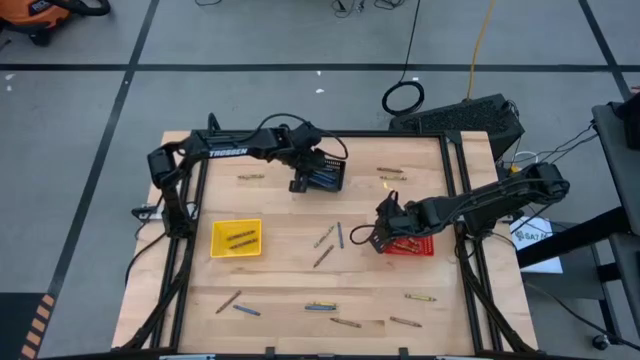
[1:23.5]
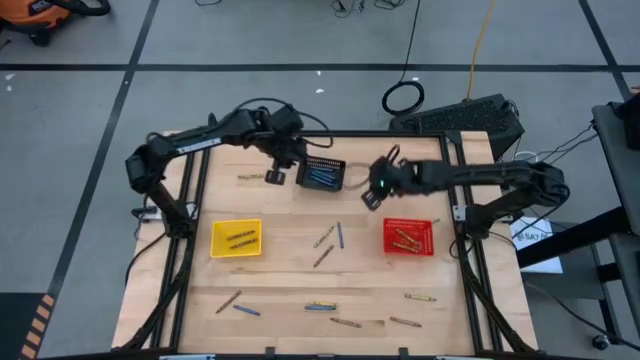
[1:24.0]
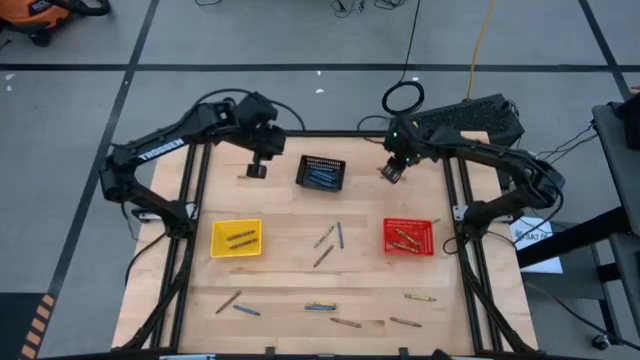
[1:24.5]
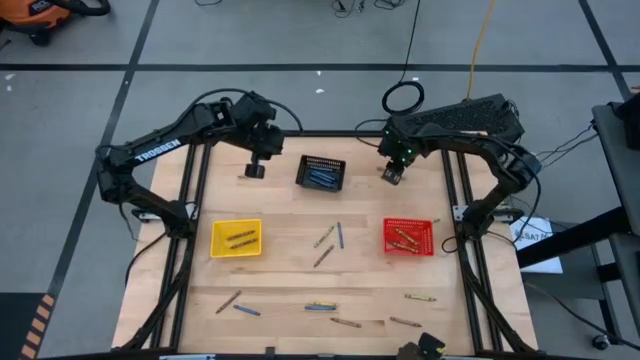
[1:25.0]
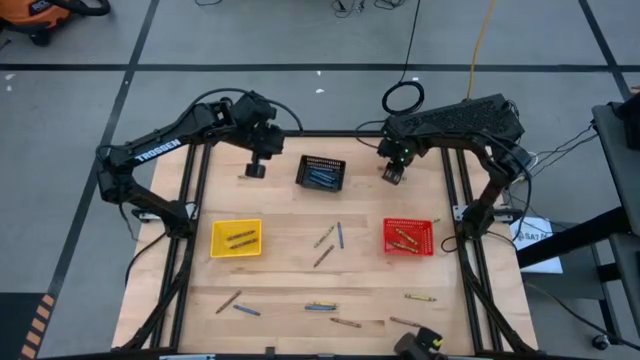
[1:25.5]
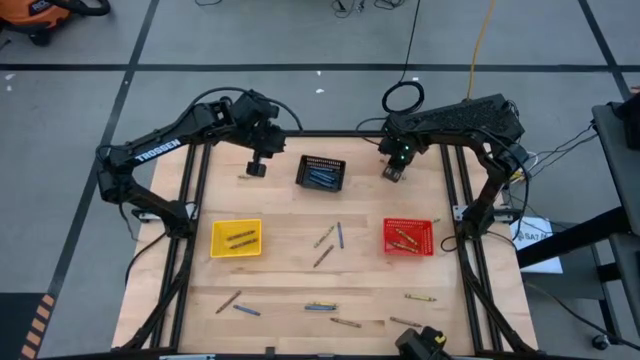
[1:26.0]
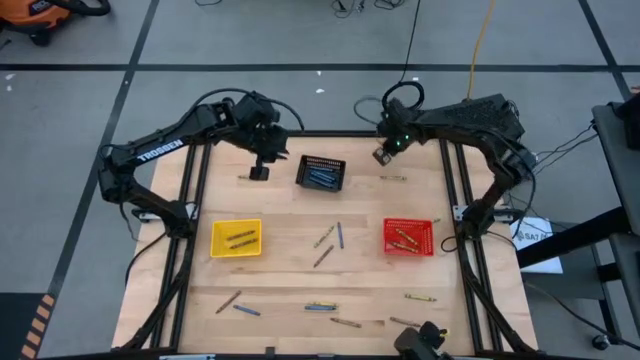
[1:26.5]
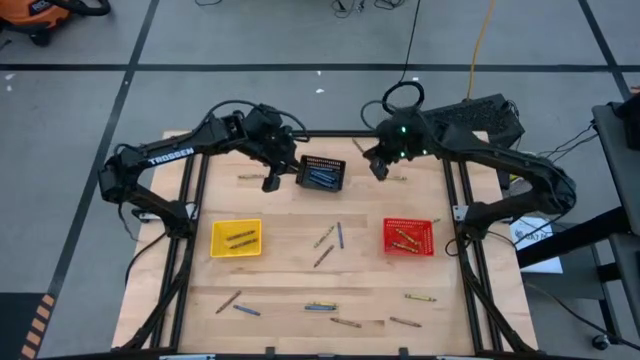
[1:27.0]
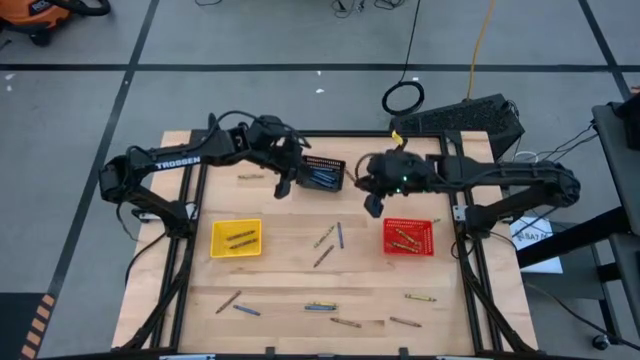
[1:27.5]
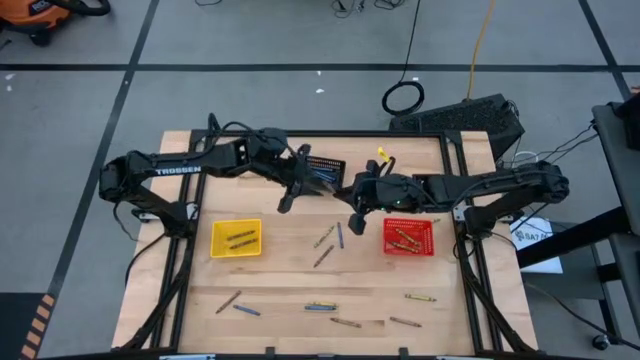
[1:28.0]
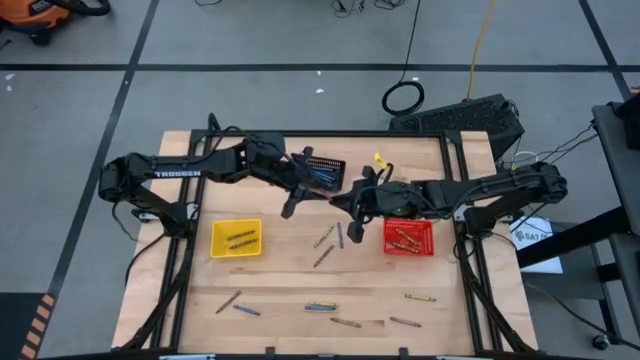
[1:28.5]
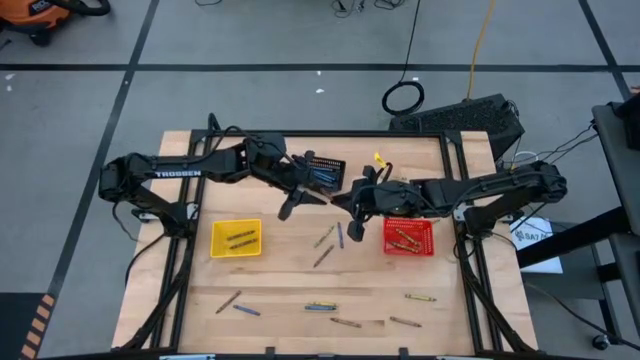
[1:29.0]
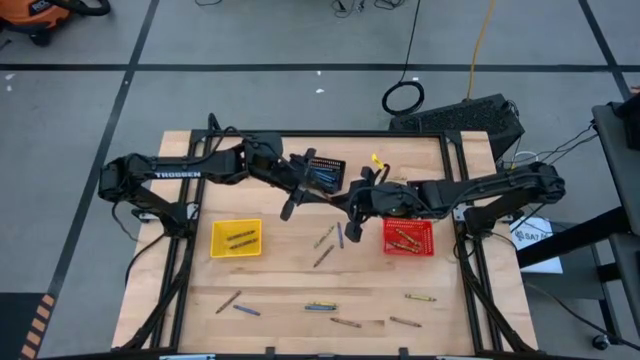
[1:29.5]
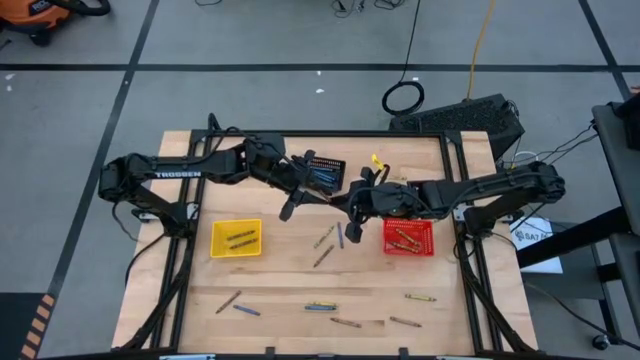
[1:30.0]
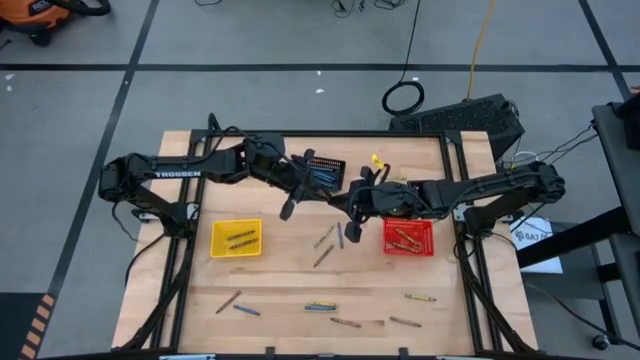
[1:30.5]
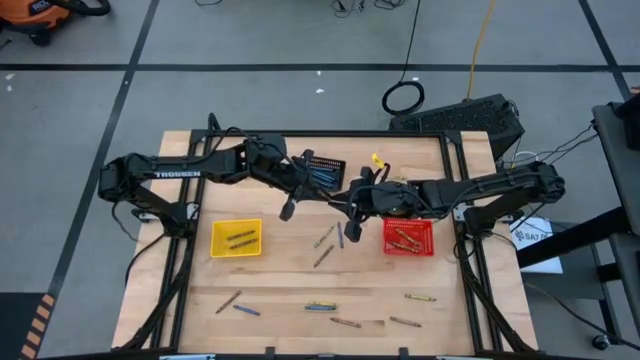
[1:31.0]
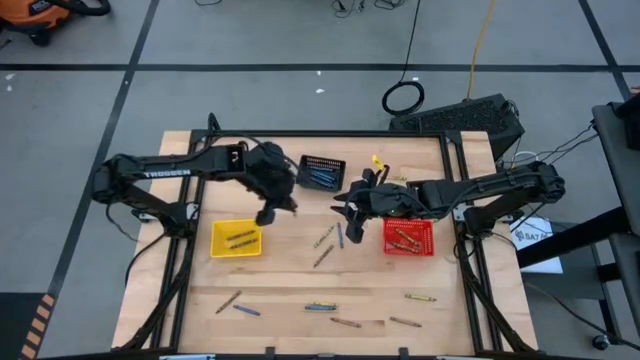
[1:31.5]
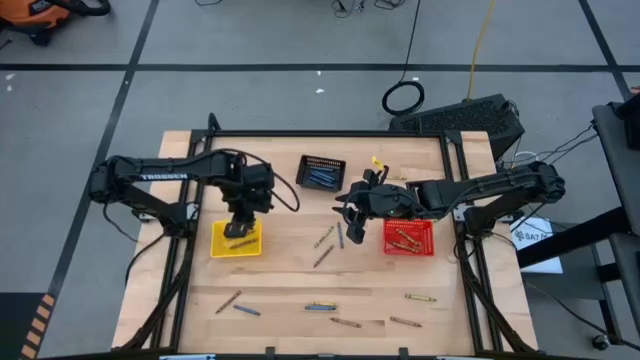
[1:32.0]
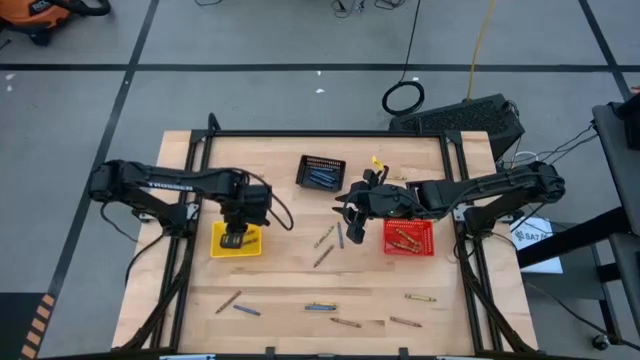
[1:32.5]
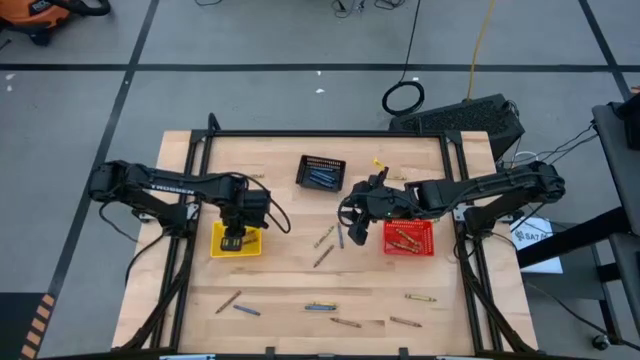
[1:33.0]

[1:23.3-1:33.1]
Task: Sort crayons
Put the brown crayon into the yellow bin

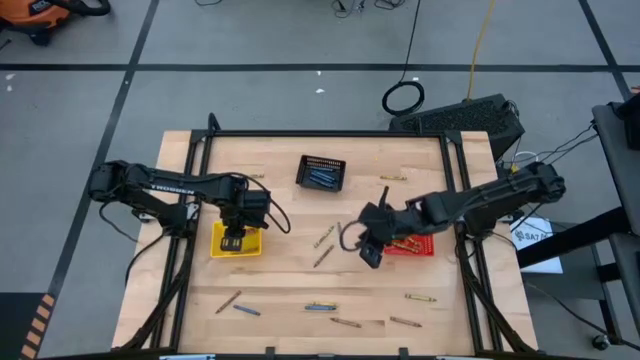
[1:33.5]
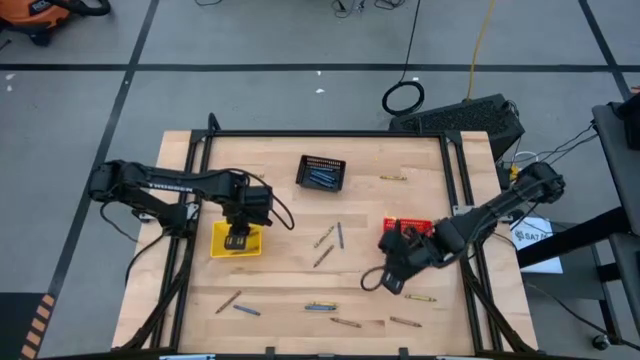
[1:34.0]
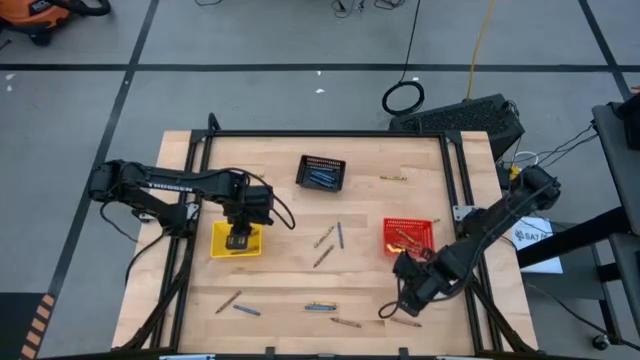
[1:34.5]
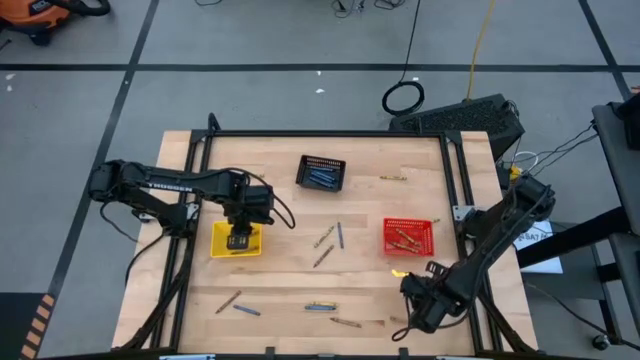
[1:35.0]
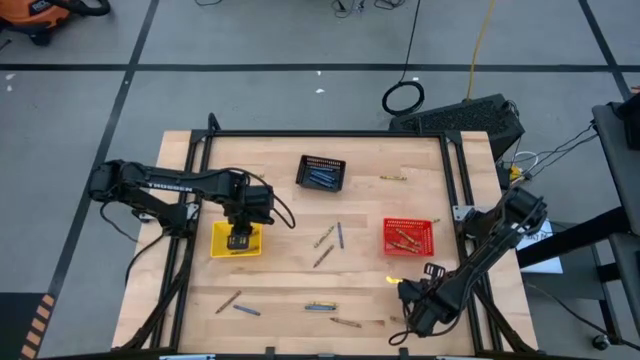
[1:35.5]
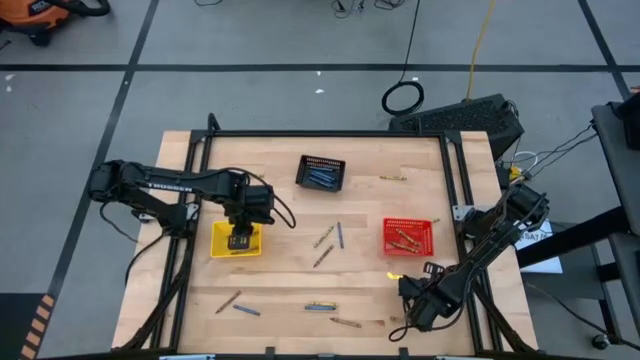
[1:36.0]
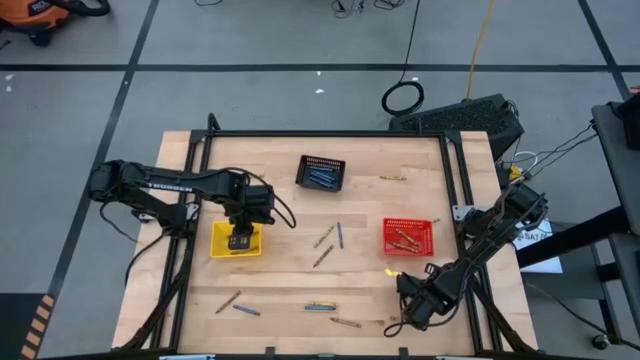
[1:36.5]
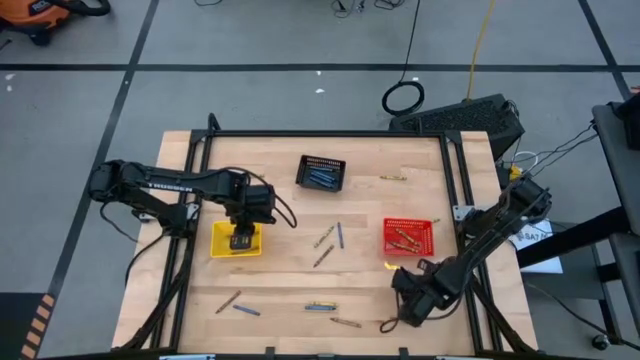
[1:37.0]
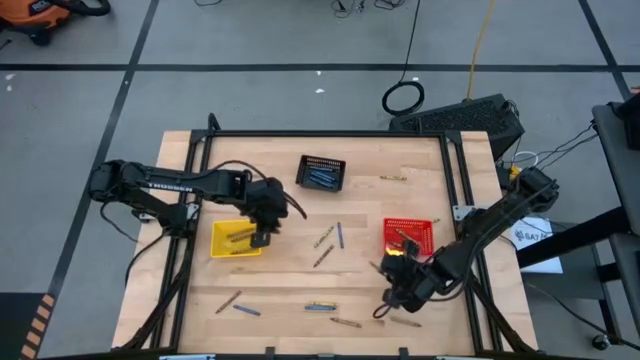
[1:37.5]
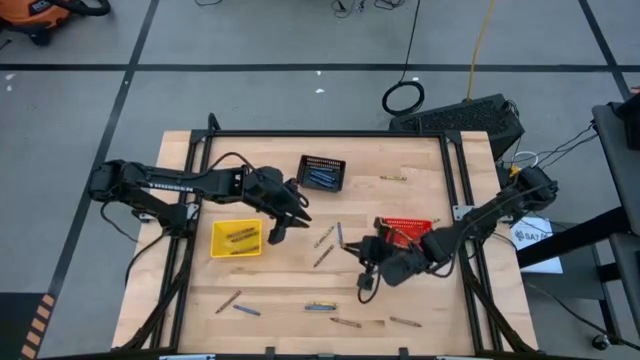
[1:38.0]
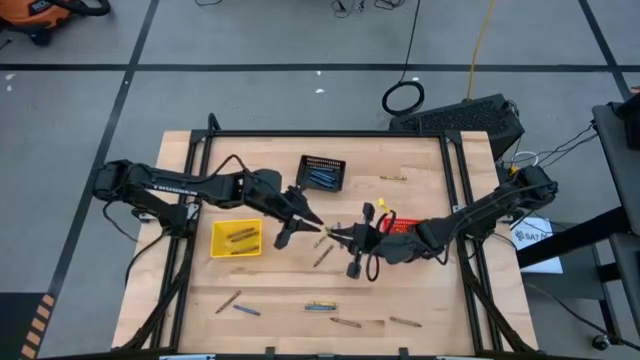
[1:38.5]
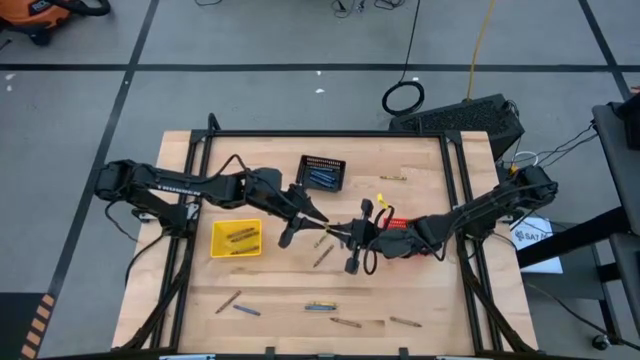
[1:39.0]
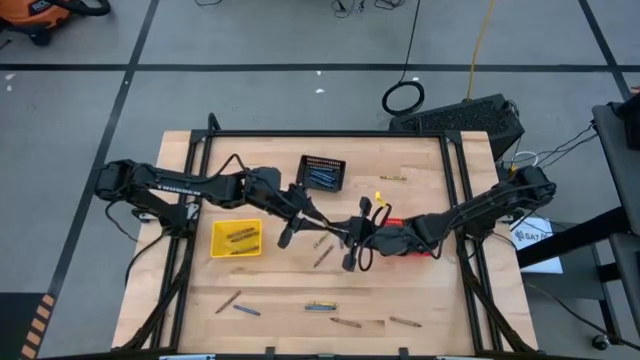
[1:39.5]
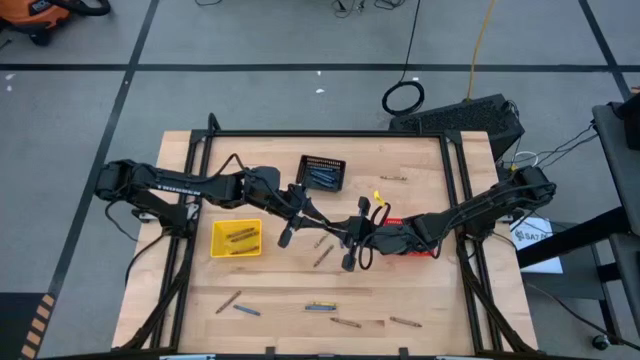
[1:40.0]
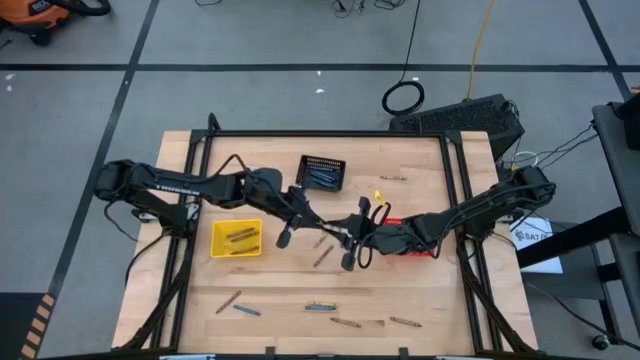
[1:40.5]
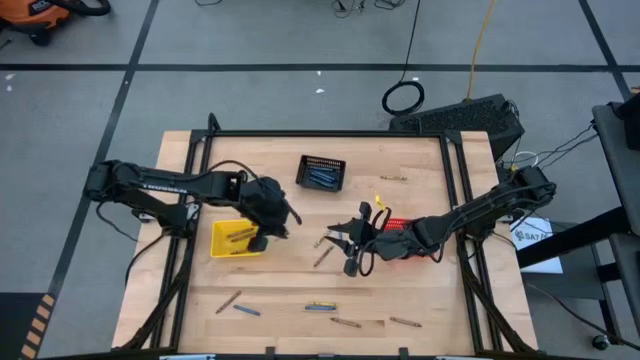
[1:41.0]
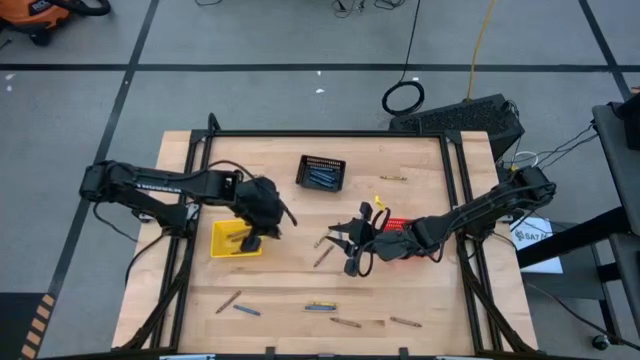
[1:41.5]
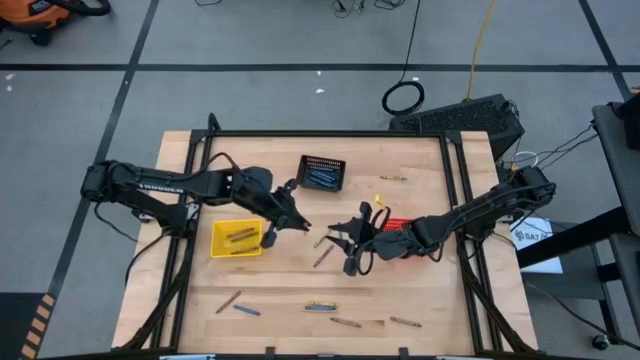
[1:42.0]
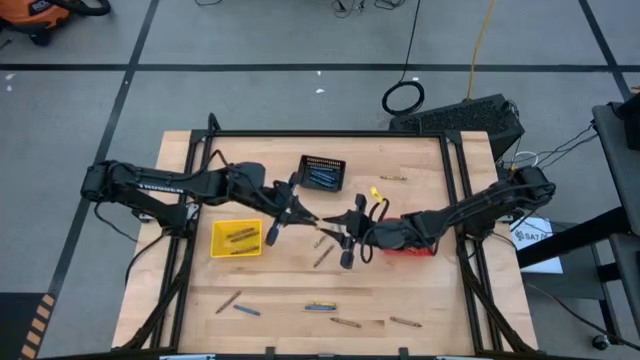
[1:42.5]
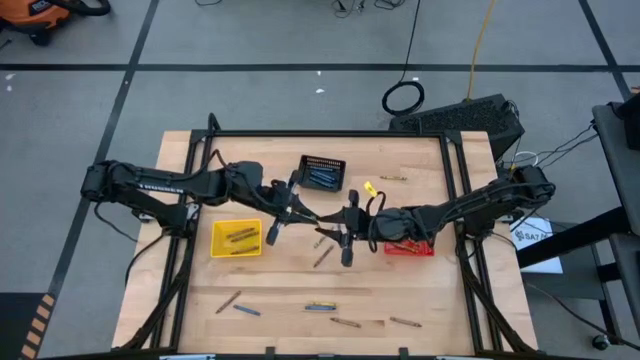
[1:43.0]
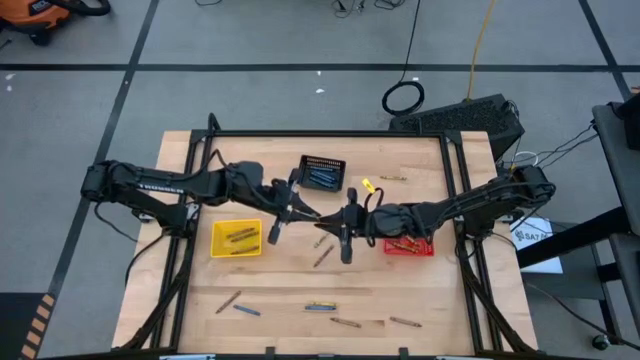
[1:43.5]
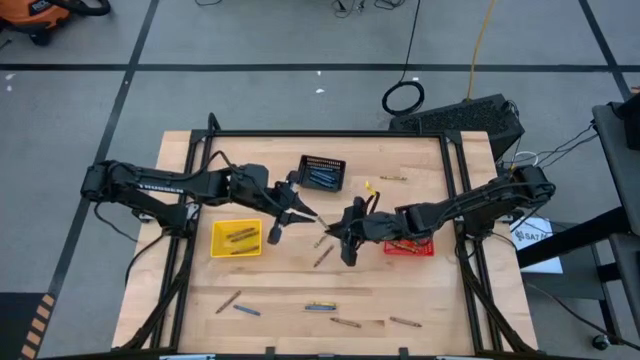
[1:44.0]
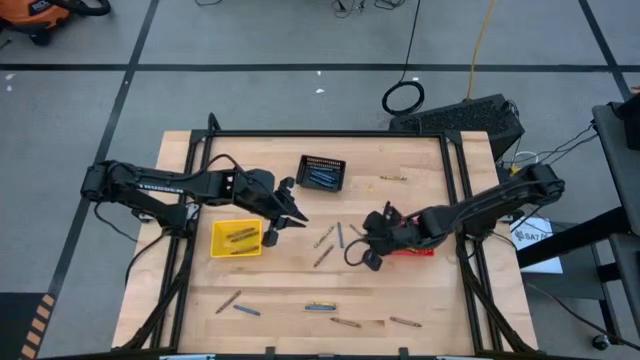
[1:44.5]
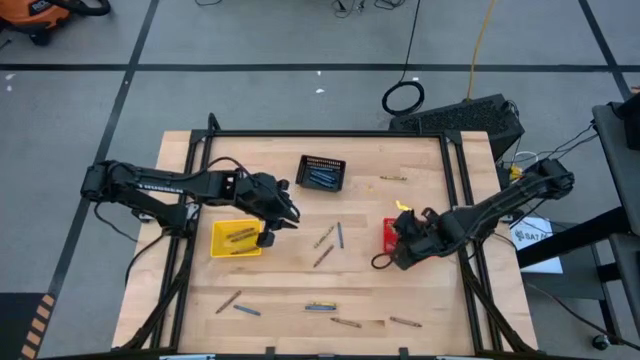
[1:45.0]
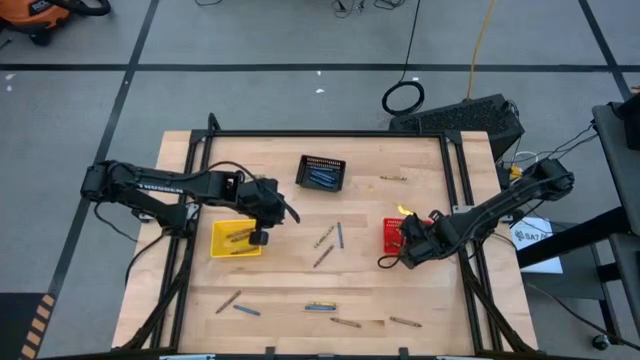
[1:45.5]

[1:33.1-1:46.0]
Put the green crayon into the red bin
